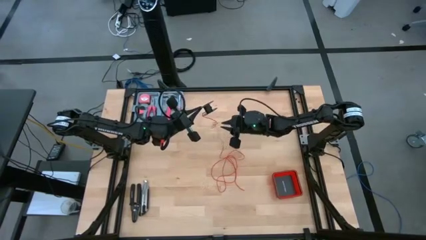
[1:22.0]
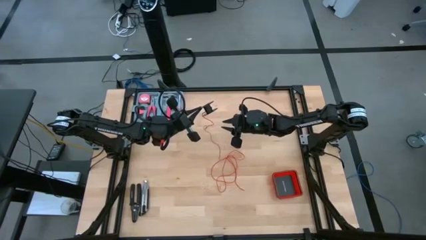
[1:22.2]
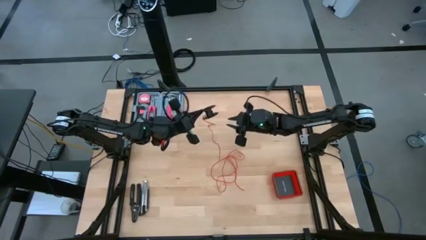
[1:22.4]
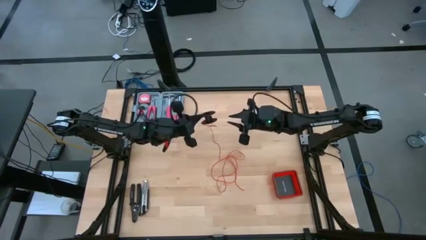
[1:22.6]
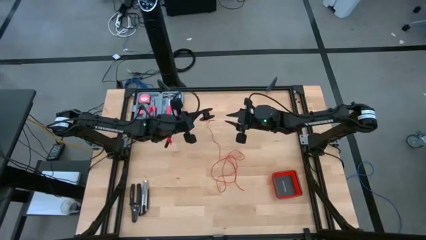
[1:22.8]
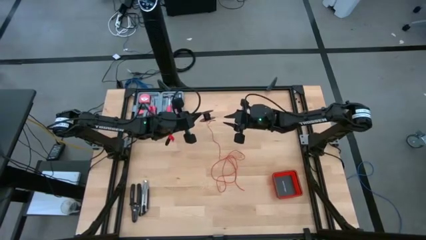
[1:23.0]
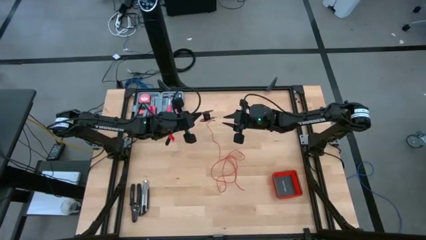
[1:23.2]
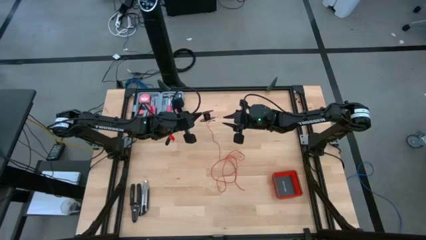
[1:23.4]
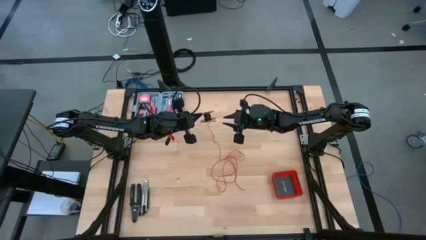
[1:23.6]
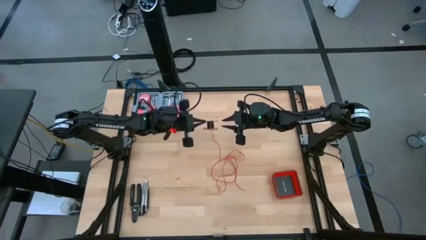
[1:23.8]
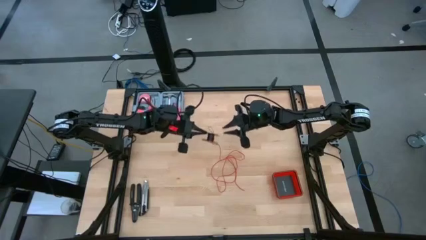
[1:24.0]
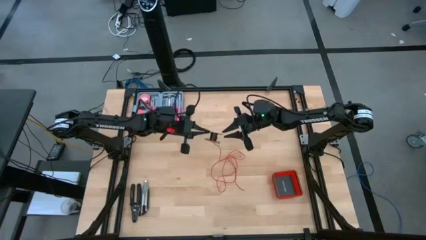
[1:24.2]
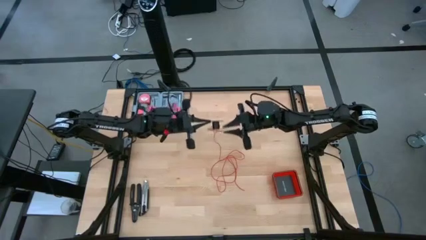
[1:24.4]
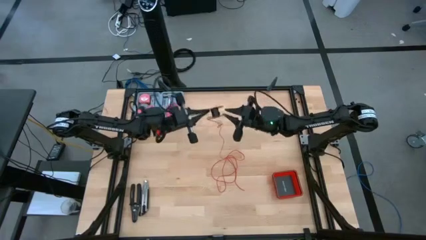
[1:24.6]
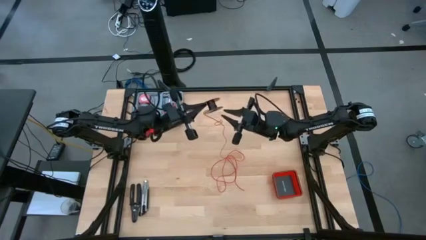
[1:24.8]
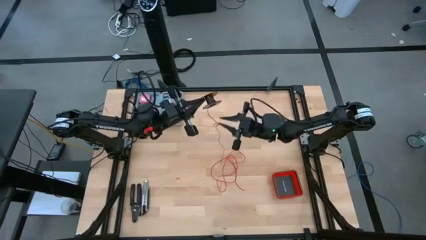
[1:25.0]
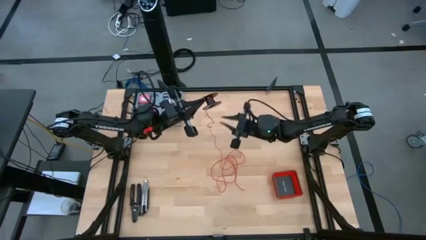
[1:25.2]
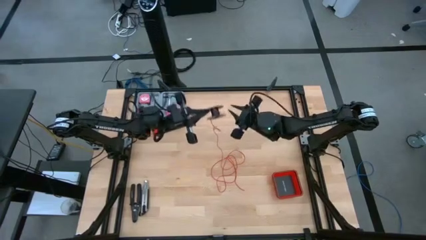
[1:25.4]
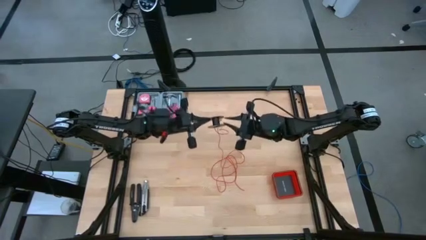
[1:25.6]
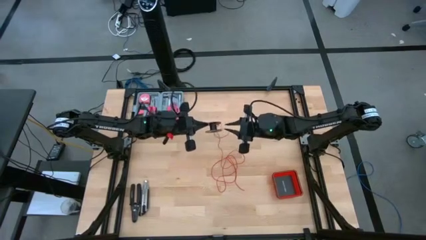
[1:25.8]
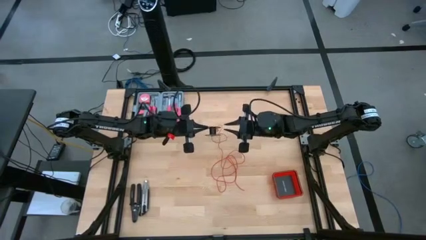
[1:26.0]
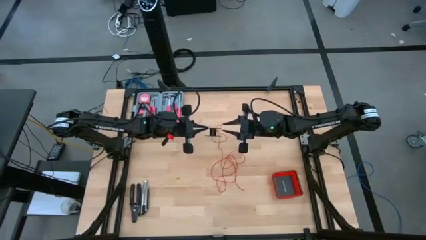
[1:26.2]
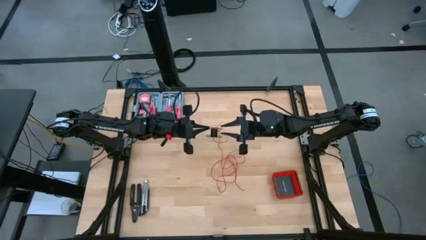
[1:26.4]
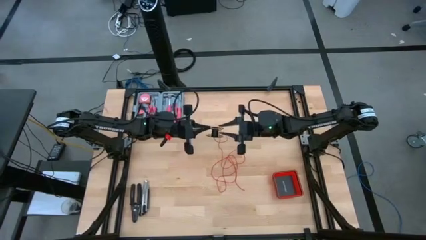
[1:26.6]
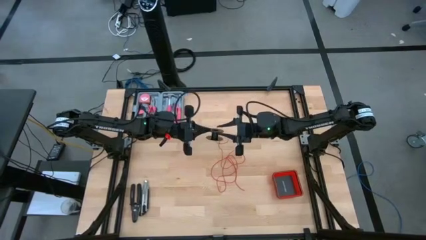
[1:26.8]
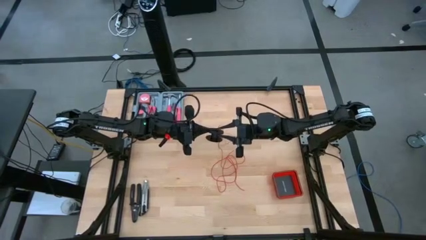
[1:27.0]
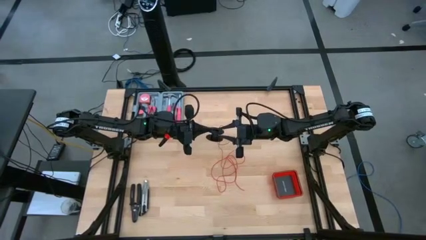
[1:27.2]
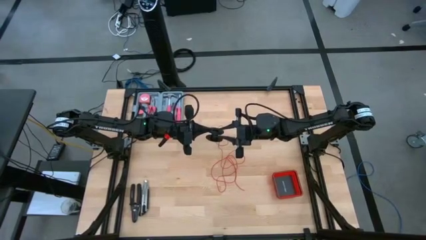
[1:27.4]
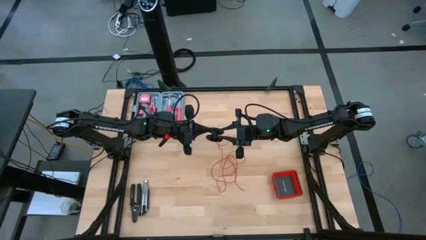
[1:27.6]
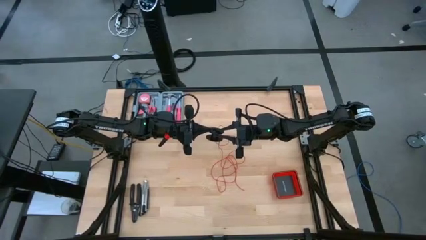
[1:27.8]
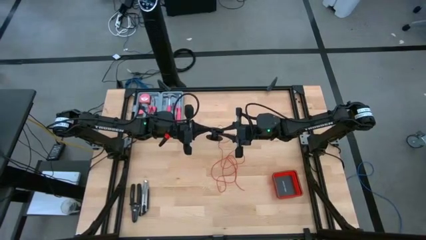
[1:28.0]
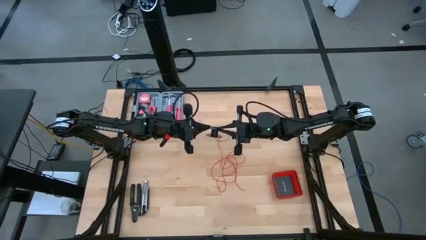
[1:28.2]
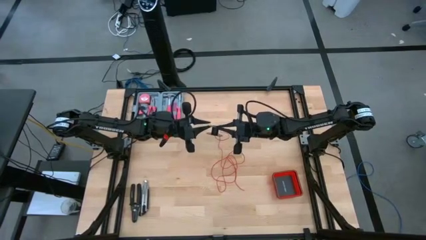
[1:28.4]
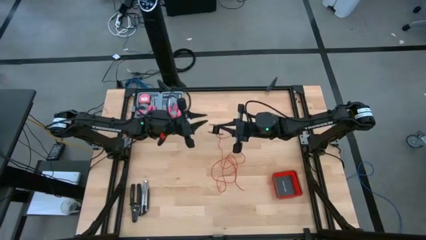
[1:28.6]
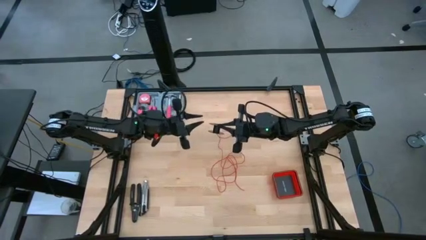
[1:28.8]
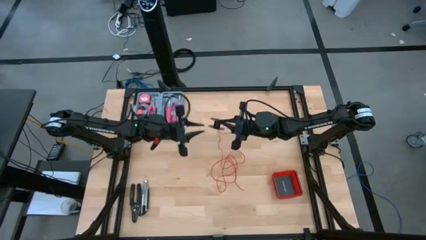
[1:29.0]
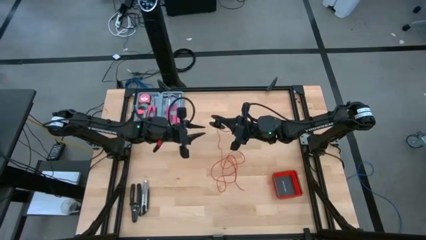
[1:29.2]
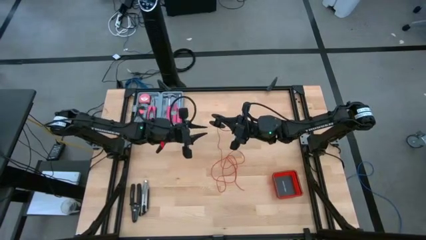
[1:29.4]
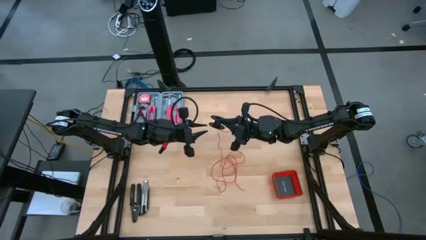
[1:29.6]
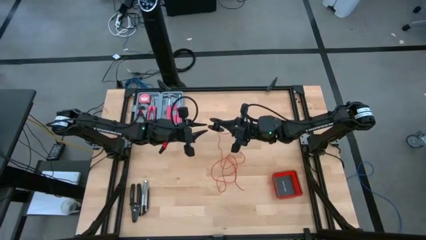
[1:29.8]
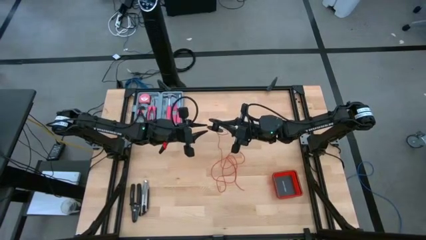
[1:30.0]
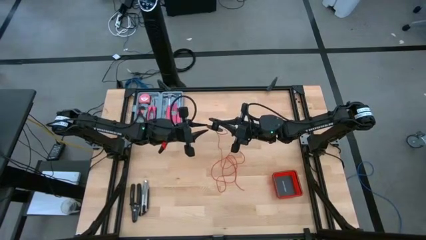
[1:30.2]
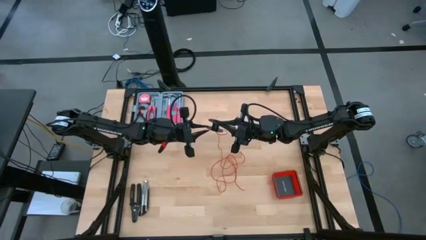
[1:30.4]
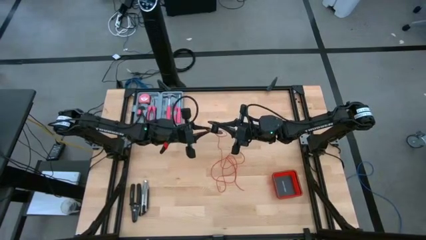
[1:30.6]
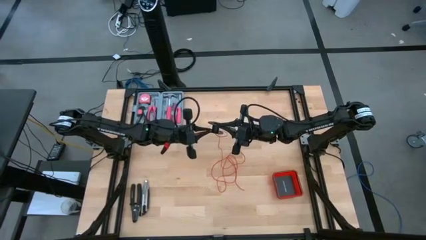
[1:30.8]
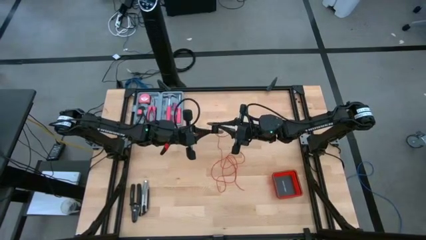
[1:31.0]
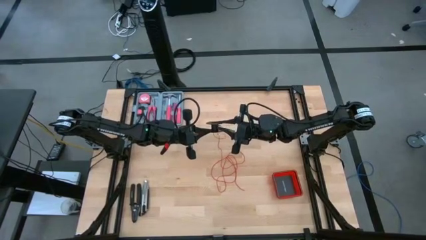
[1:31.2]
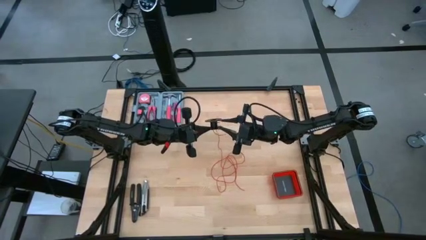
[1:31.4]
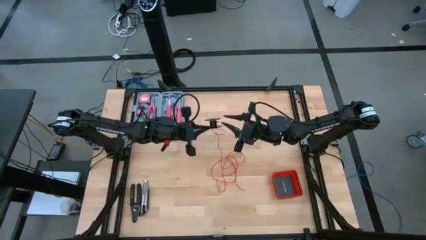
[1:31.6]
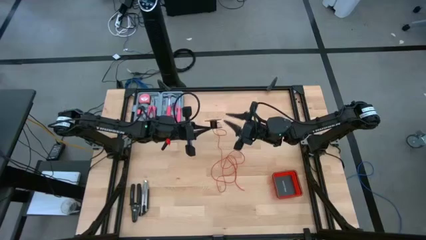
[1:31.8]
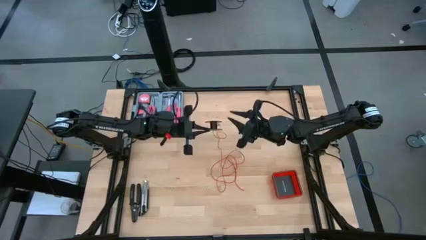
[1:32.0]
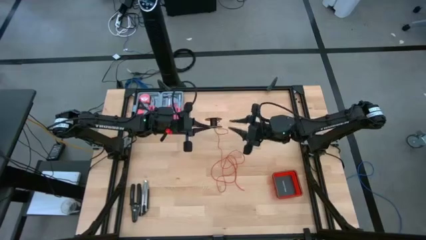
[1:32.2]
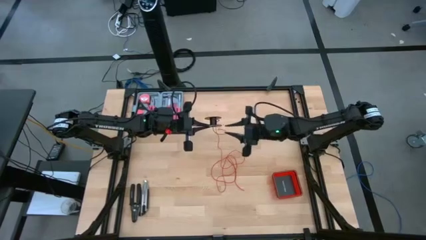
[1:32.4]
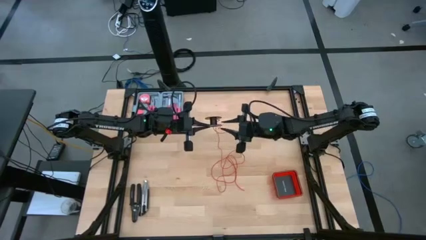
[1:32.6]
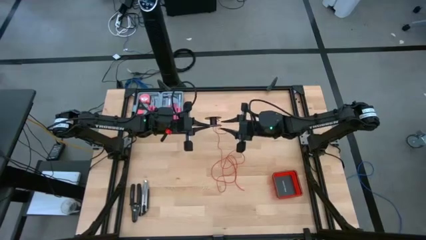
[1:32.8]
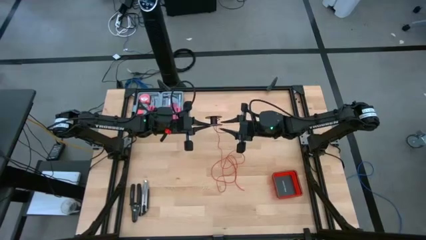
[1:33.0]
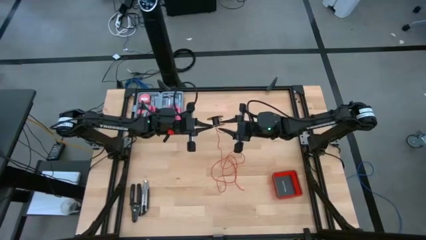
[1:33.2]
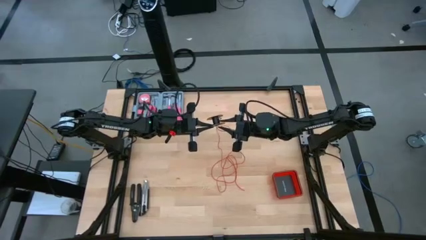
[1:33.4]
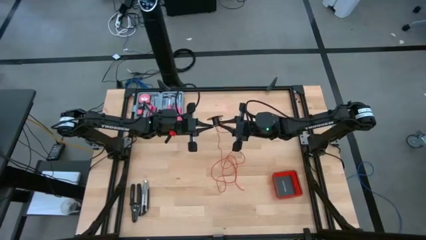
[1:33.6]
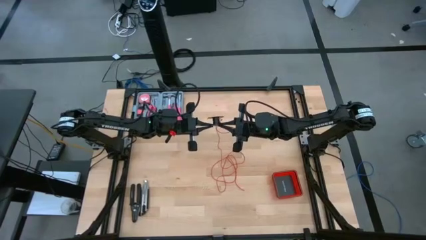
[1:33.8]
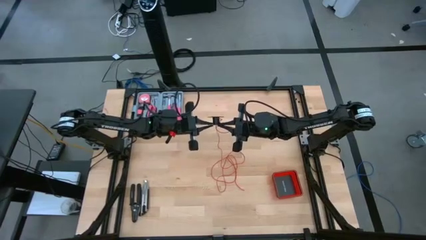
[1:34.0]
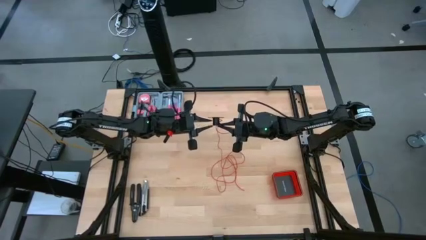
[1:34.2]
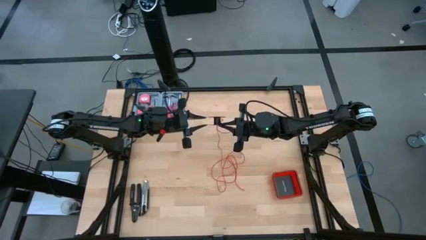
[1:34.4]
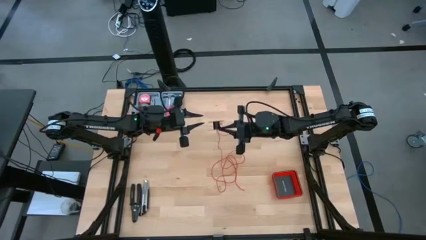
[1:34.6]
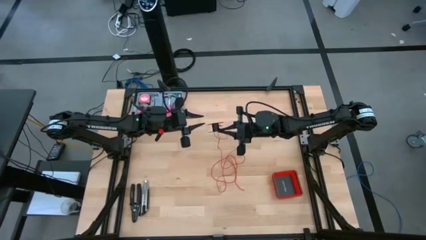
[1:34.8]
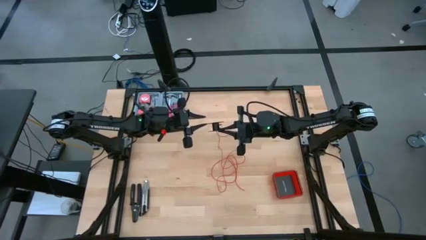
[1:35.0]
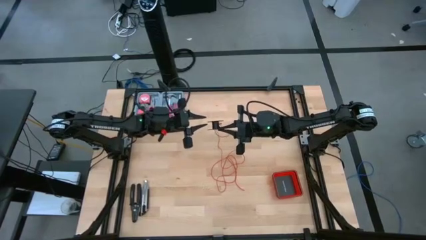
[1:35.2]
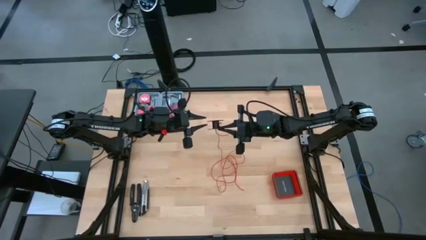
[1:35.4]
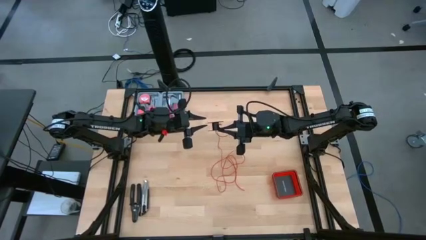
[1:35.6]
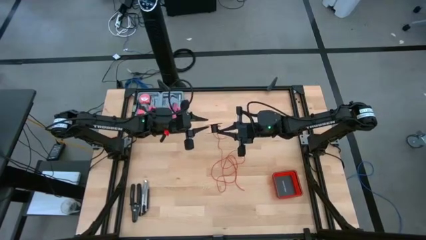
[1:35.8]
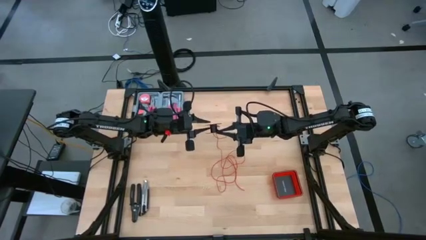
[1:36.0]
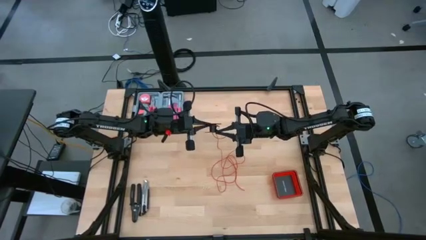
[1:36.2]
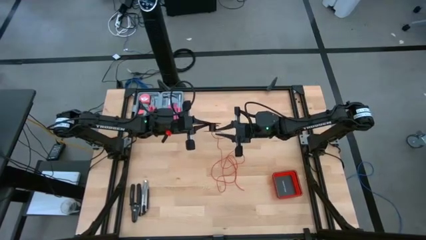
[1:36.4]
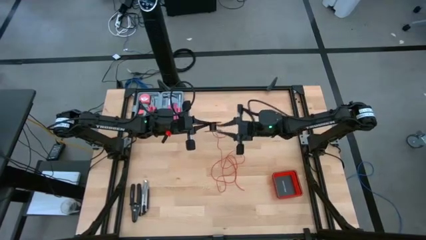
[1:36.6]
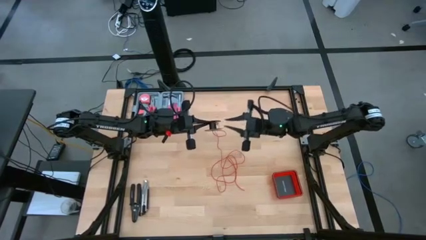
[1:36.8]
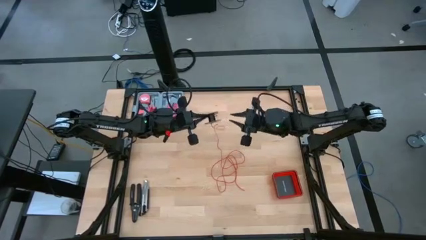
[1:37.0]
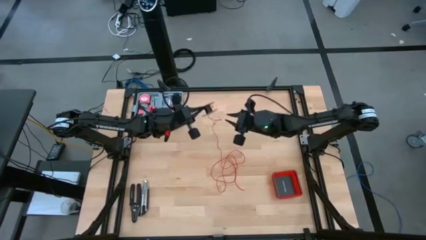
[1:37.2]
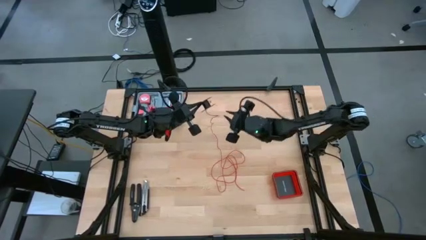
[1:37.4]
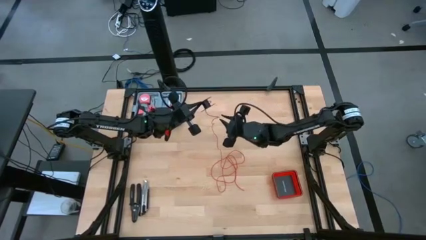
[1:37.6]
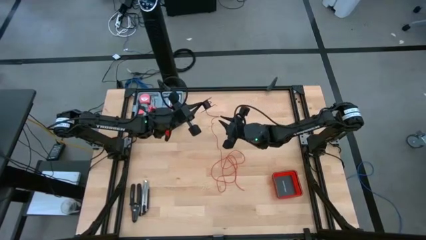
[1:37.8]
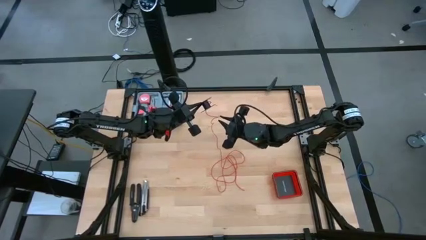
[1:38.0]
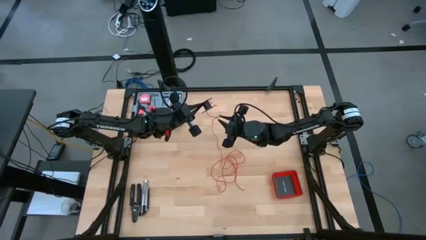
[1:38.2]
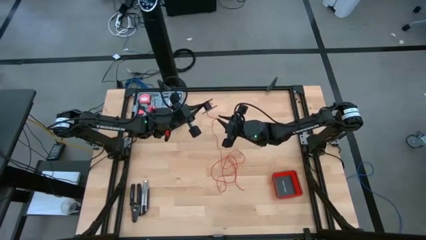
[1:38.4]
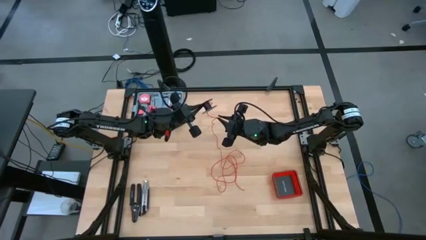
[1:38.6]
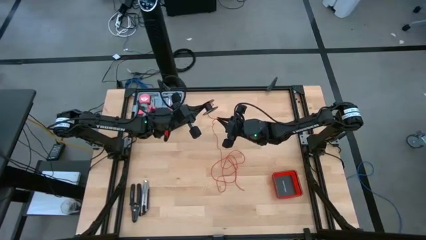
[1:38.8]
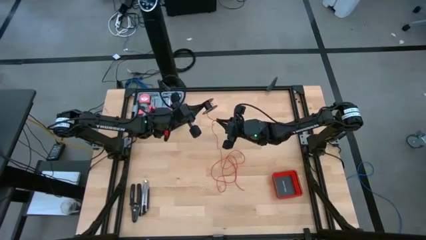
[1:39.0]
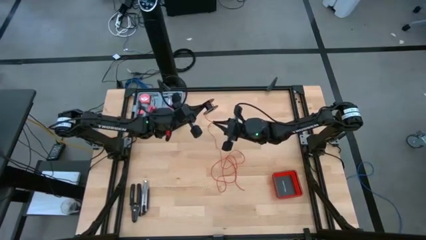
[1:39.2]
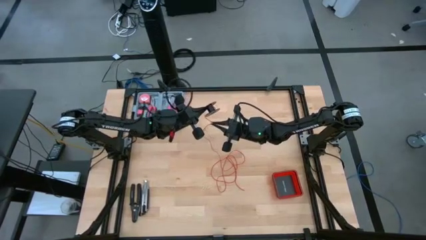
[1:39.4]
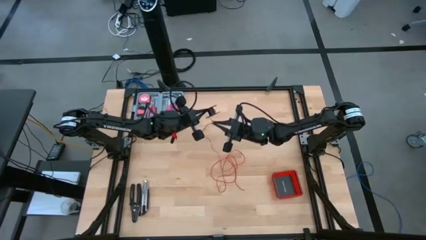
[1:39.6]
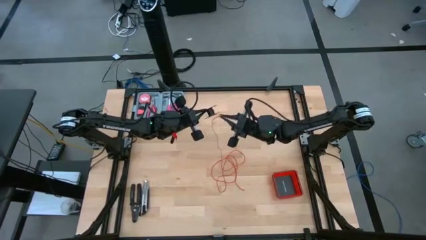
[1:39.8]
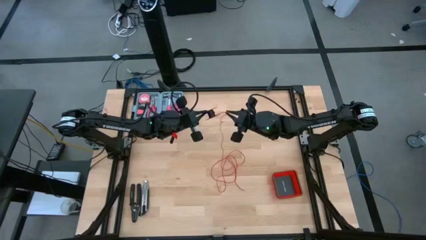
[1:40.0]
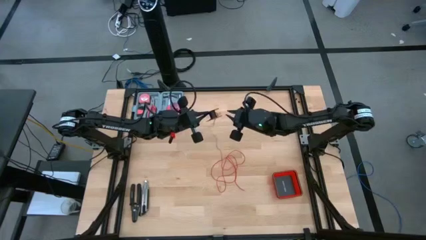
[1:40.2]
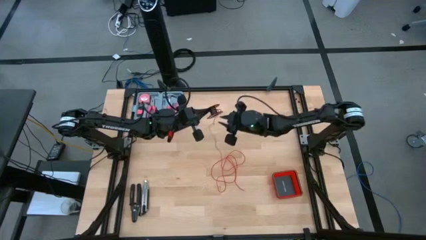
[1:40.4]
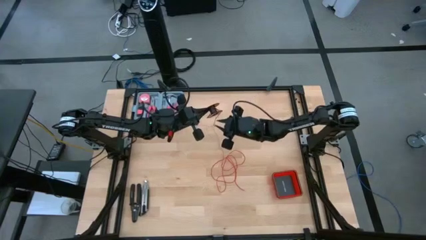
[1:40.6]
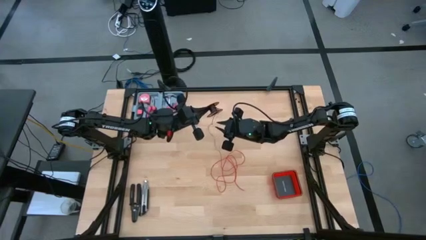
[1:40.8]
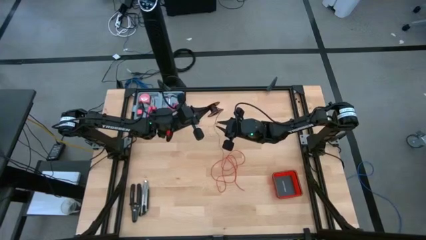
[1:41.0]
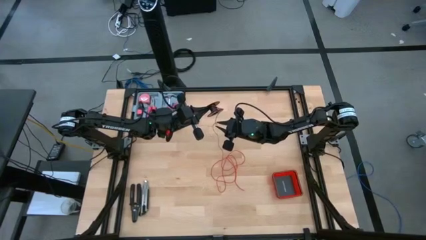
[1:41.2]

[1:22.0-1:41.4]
Task: Coil cords
Coil the red wire onto the spool
